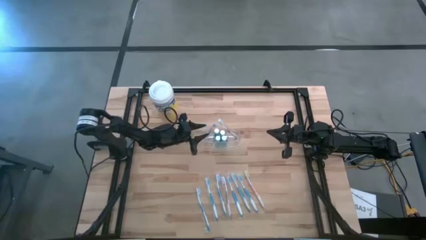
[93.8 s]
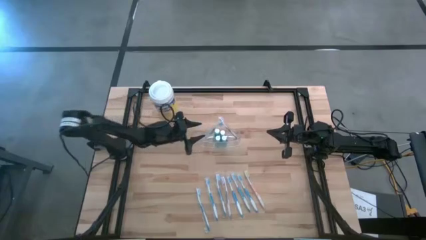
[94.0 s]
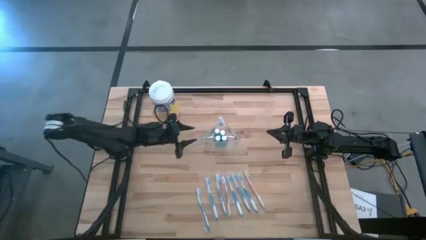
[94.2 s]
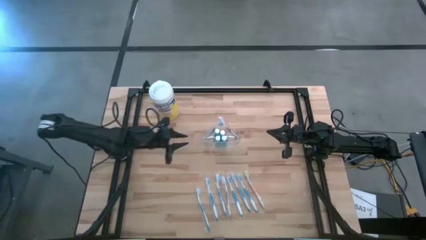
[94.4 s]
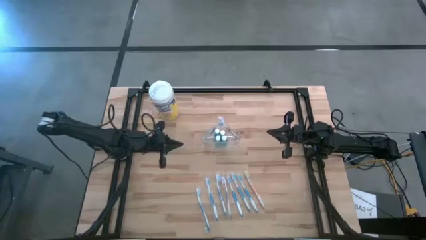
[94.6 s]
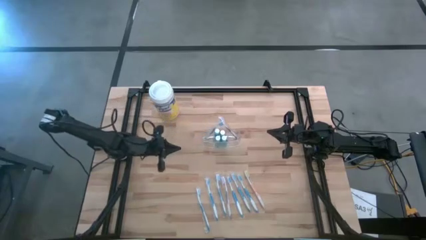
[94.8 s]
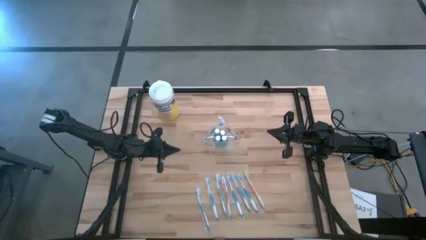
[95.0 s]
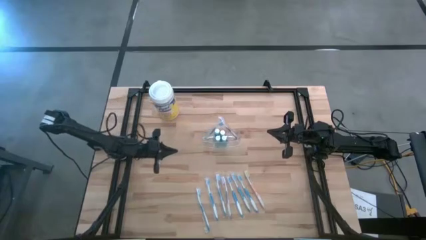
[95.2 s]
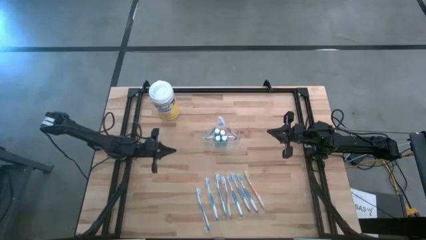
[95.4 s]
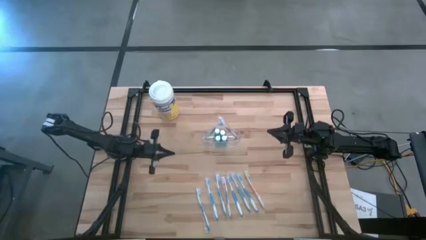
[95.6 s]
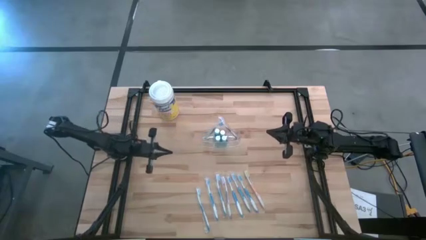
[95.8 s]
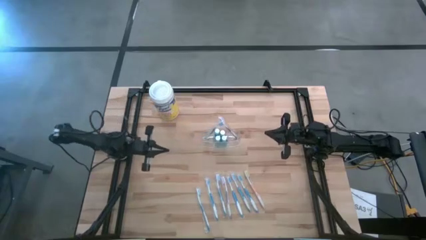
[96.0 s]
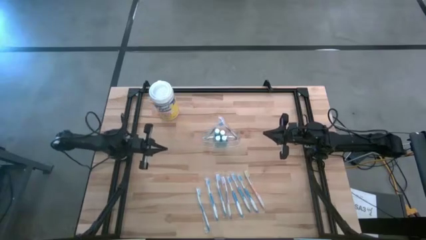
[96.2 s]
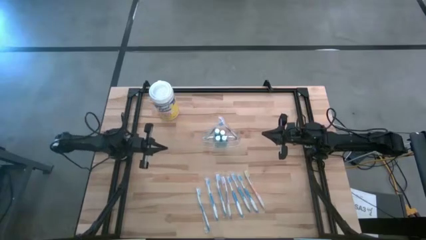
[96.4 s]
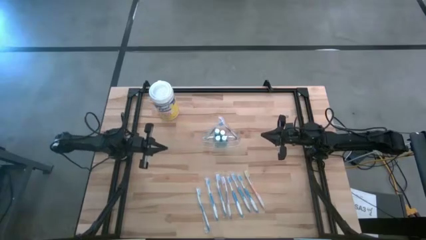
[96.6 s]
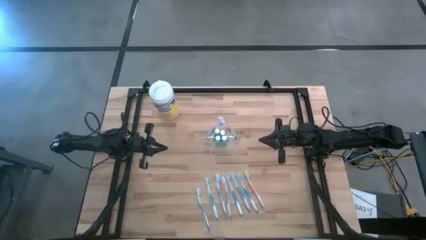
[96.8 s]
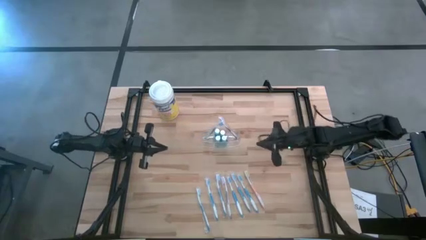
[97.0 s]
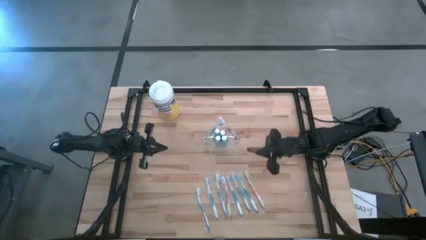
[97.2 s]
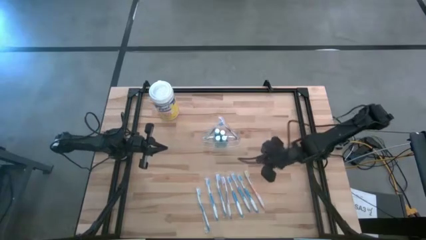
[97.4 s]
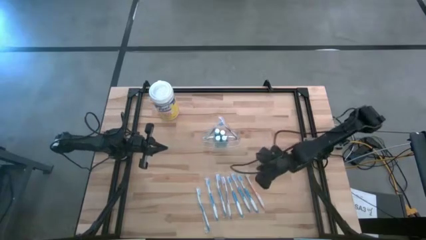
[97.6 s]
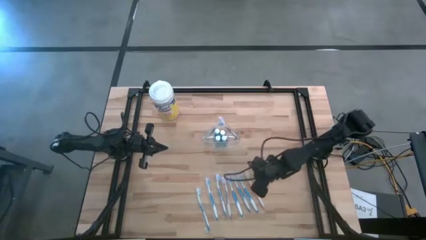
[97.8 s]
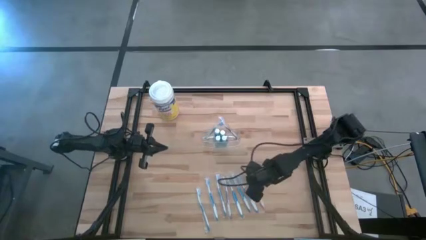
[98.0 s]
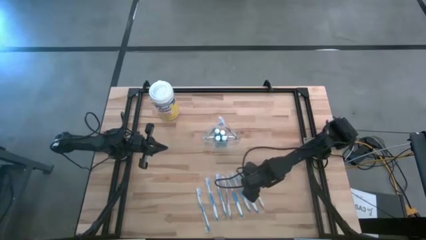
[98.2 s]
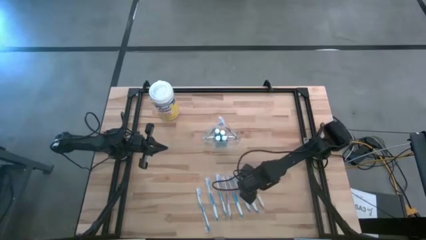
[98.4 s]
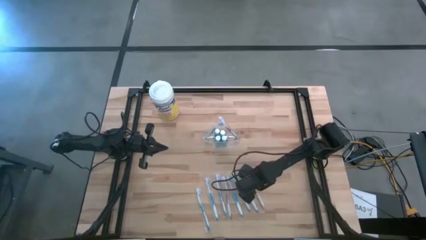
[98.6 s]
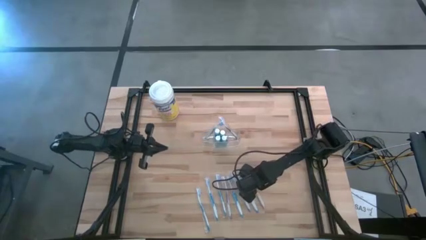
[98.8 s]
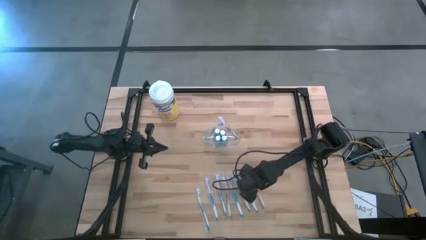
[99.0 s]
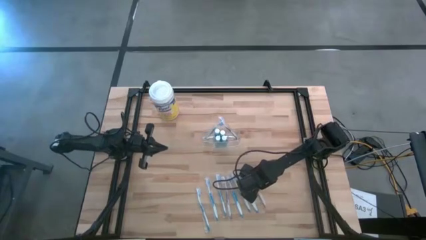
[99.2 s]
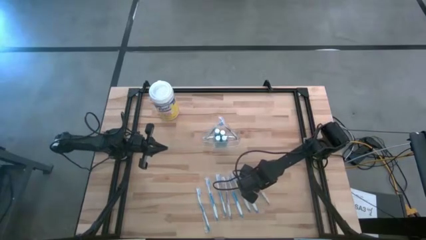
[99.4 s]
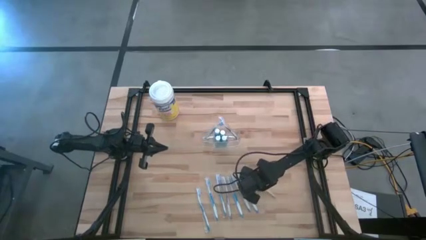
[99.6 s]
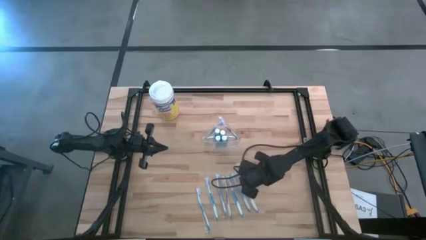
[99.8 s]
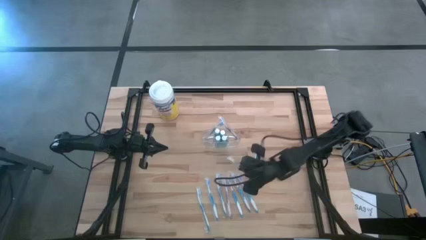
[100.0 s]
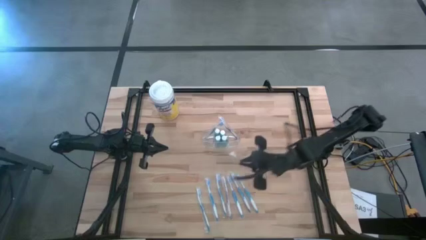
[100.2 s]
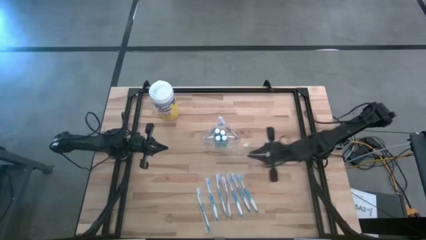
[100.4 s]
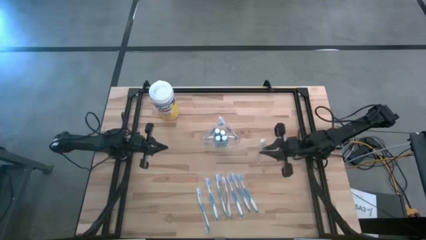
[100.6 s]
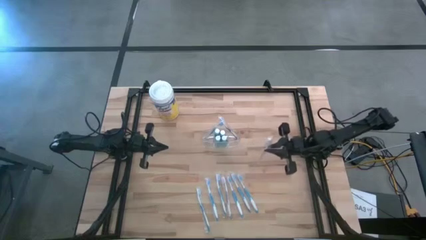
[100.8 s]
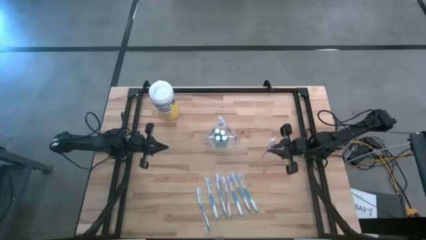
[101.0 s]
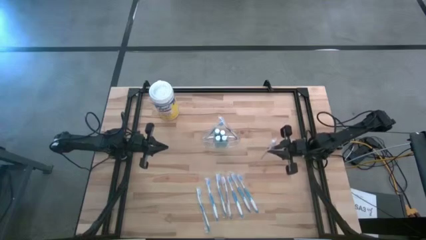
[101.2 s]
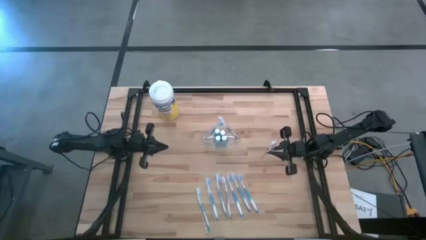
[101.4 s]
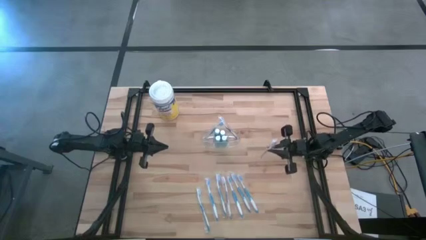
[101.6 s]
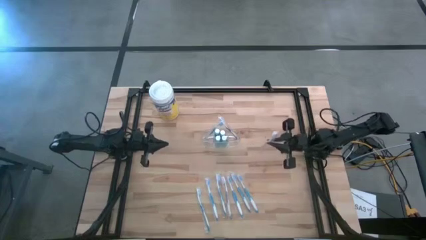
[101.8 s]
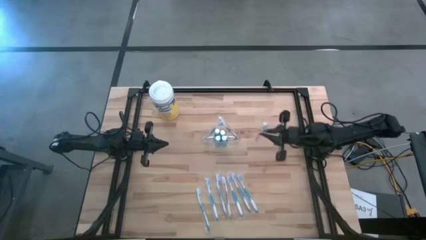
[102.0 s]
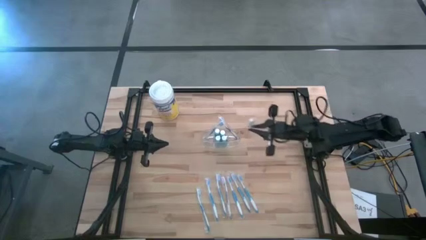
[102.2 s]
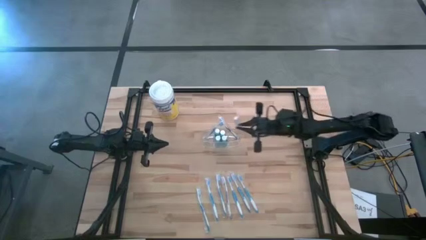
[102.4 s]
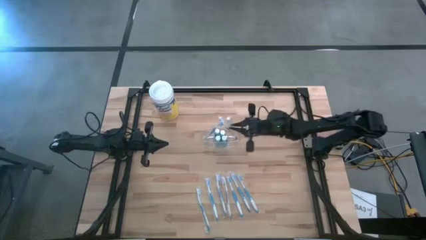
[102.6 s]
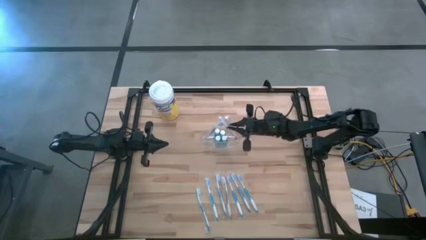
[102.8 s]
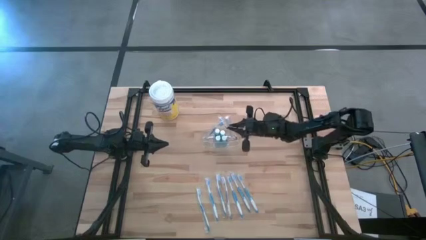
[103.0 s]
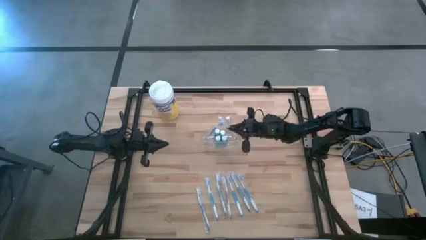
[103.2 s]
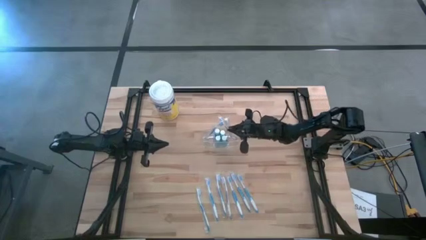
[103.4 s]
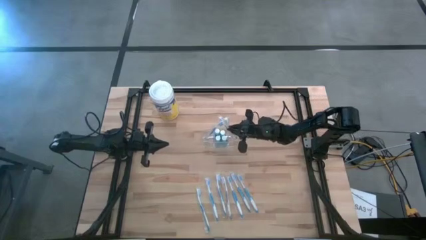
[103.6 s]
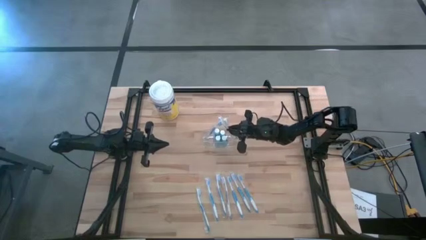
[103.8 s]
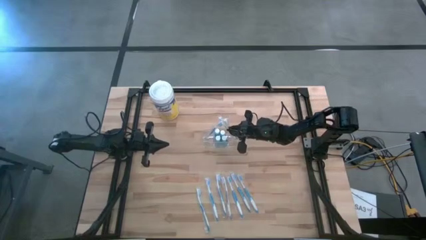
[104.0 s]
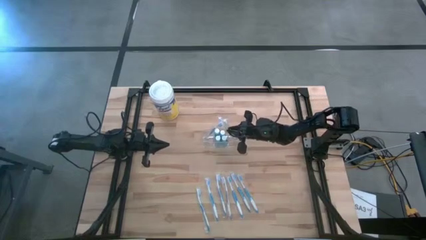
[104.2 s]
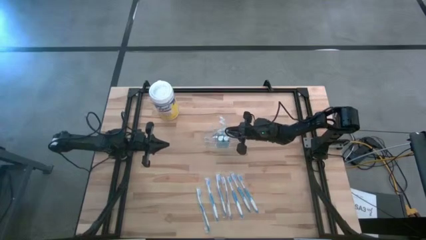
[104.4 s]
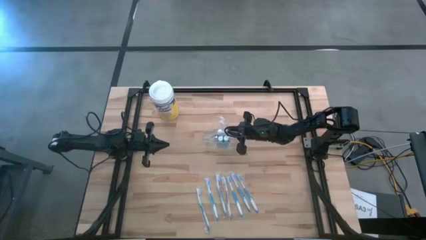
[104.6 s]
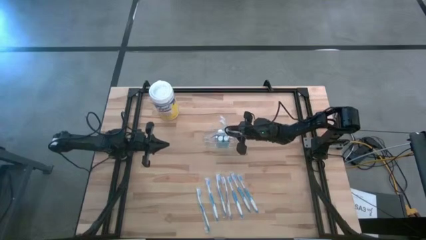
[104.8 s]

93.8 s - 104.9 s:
Task: Pick & Place toothbrushing station
Put the orange toothbrush into the right section of the transparent organizer
